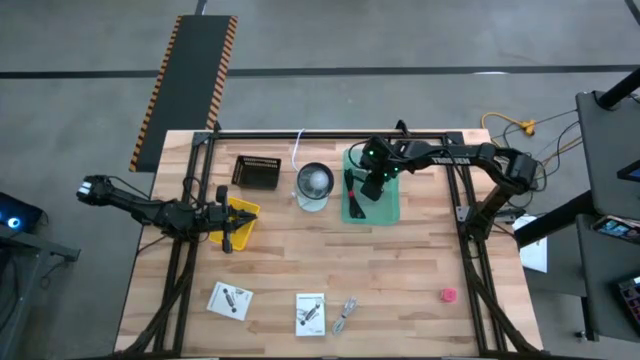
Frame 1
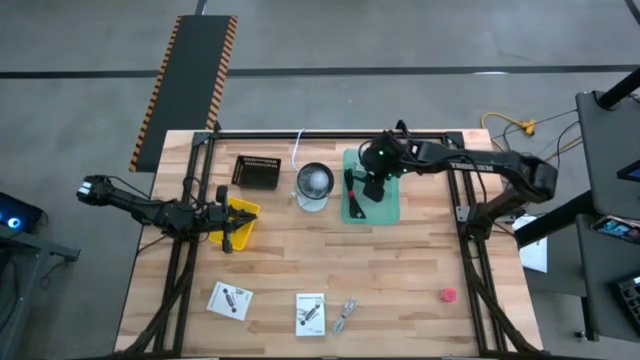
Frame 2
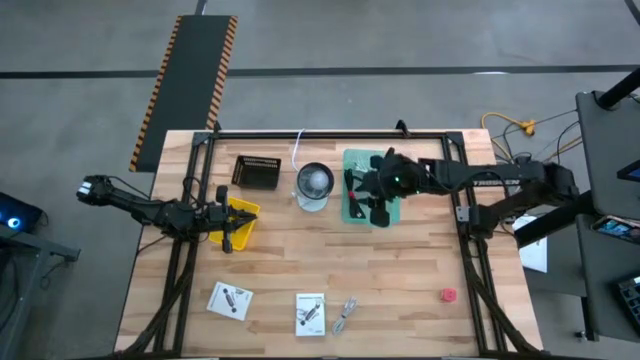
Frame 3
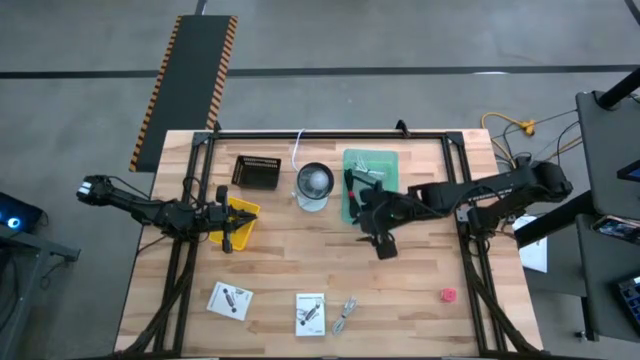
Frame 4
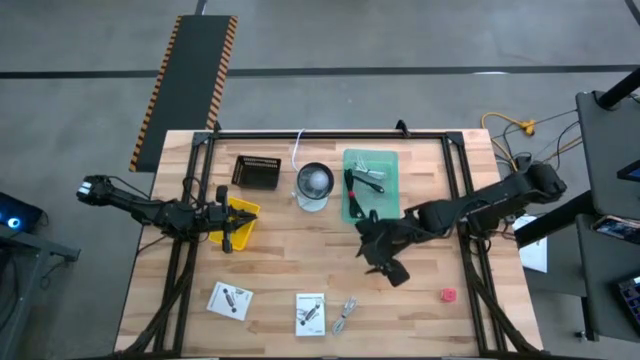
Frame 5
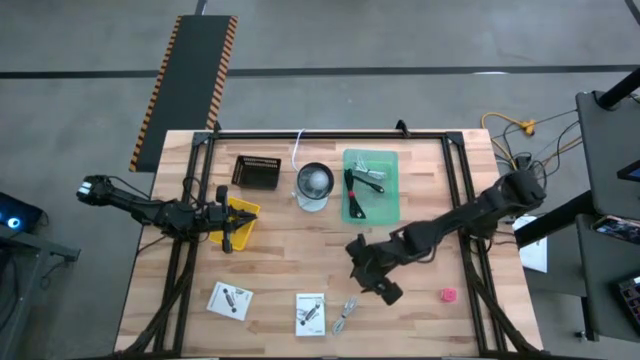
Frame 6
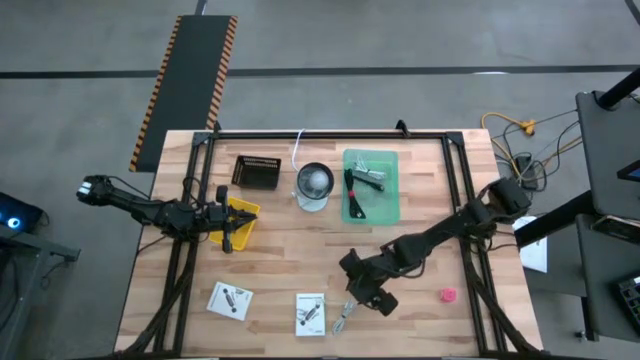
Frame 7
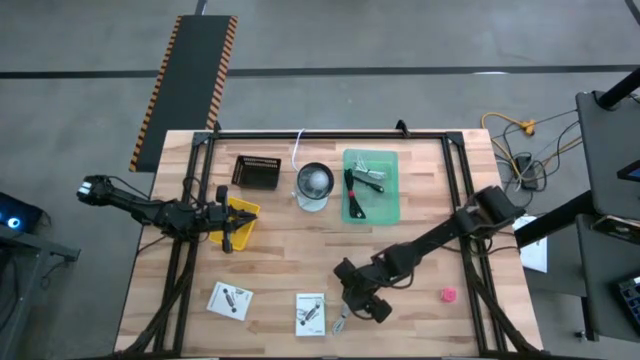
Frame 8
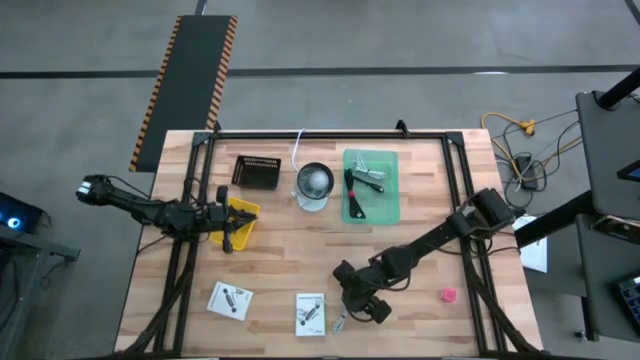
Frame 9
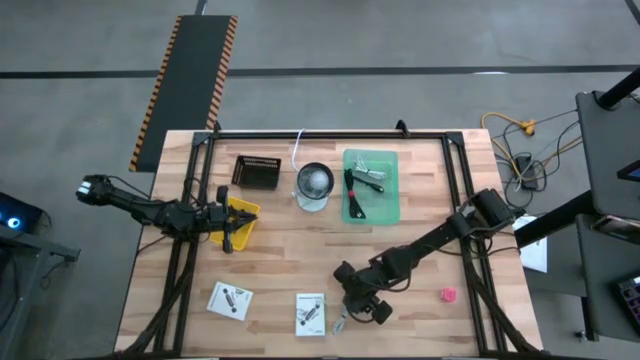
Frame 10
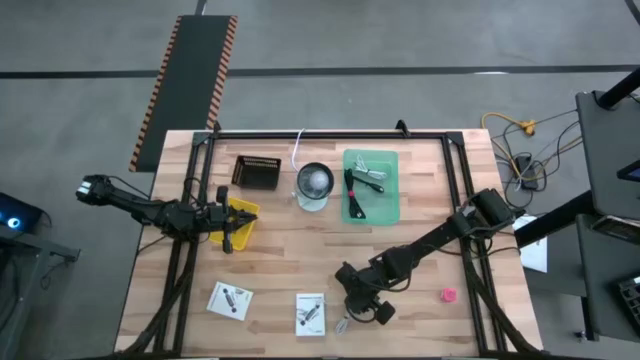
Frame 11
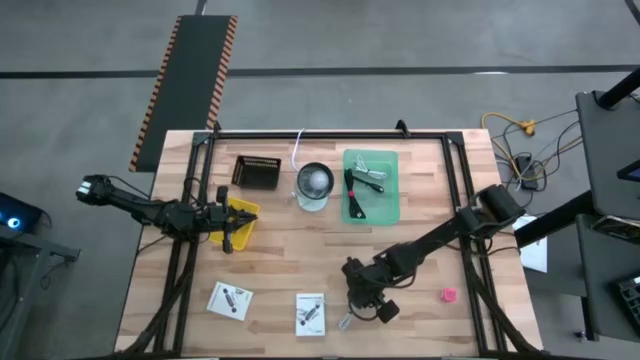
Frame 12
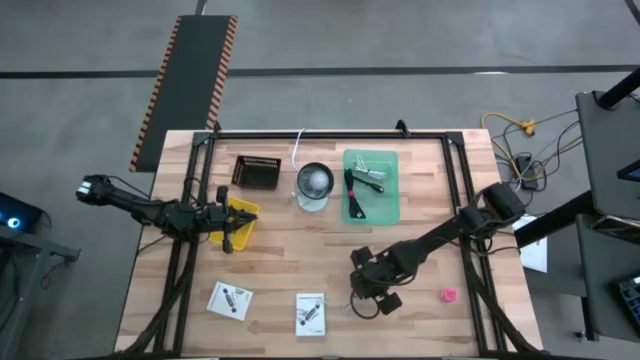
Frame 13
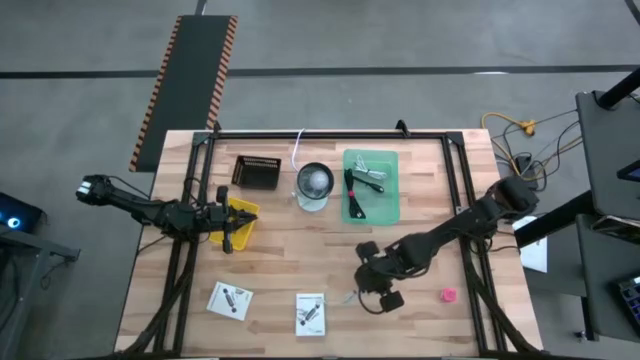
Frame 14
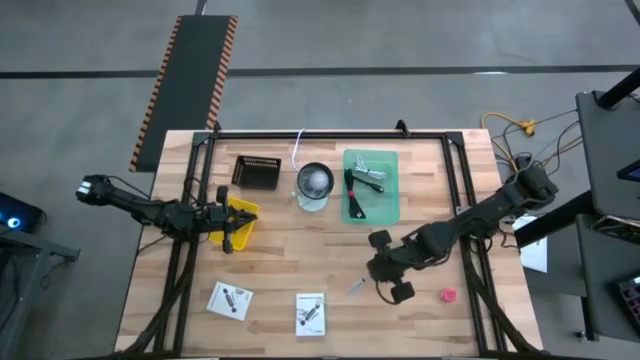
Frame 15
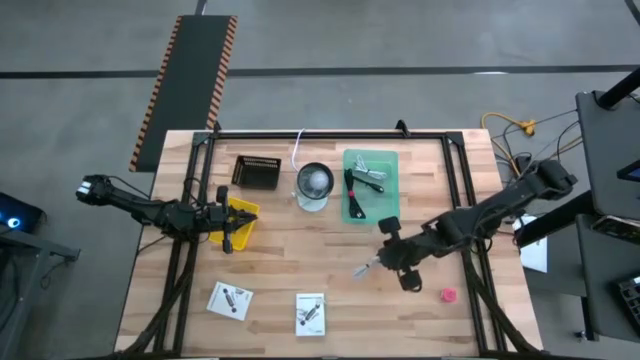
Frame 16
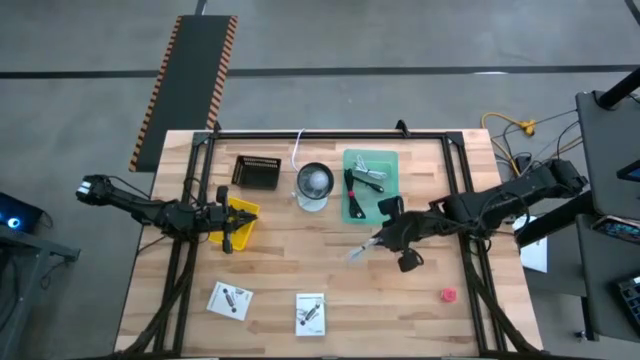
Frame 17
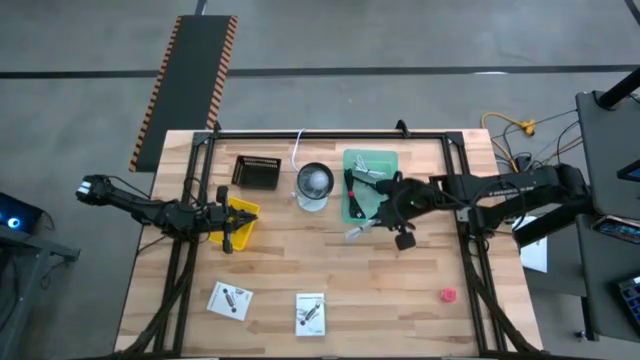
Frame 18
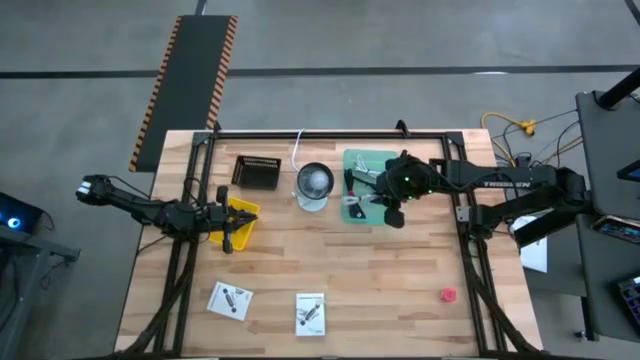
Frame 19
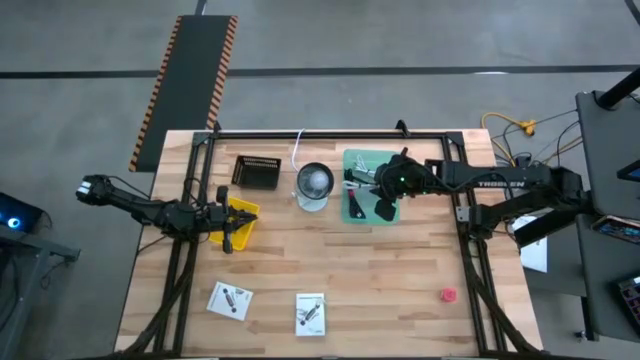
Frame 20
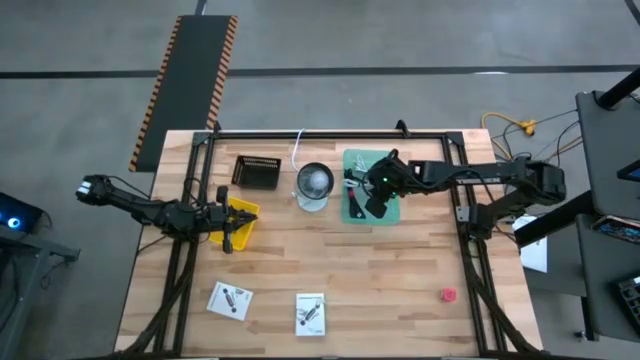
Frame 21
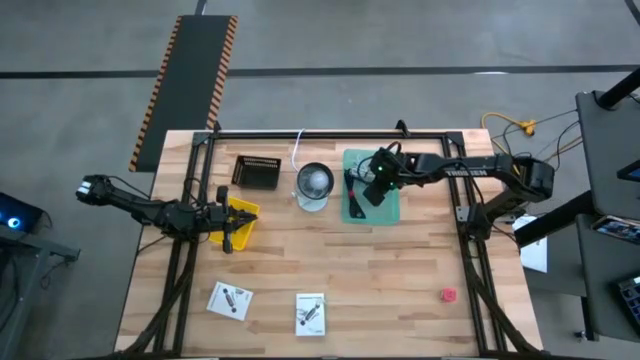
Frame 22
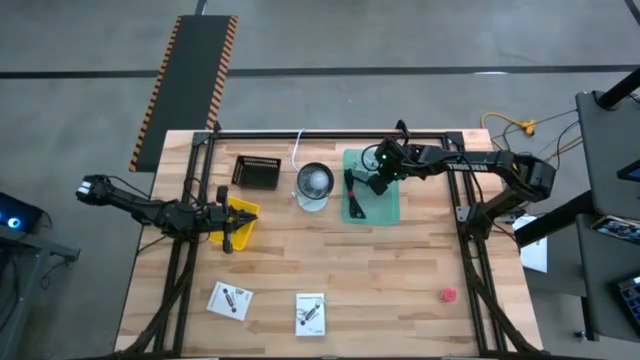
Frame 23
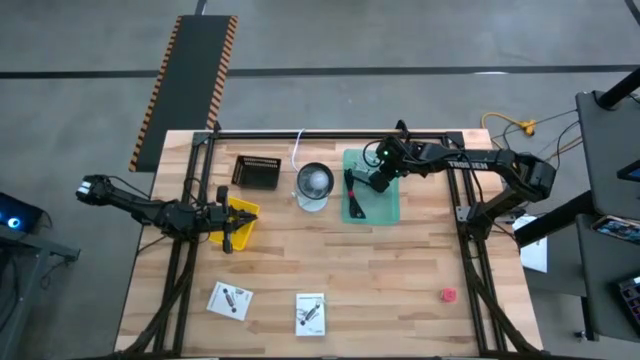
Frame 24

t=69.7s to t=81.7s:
Task: Pick and place items into bin
Put the white charger cable into the green bin

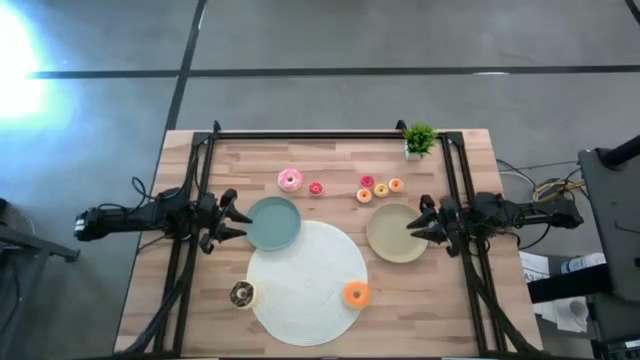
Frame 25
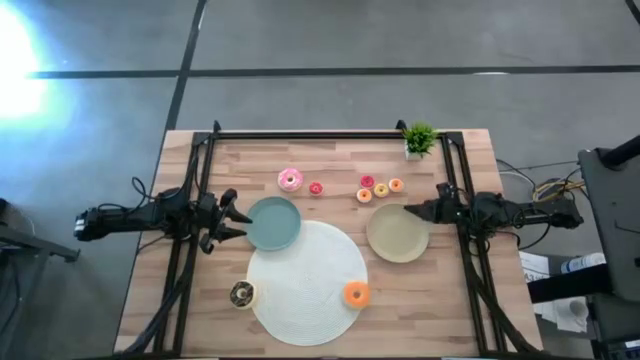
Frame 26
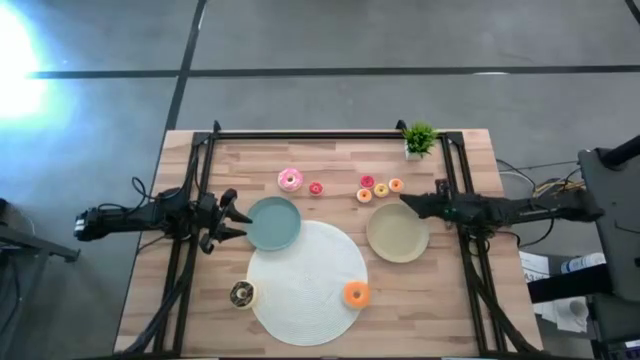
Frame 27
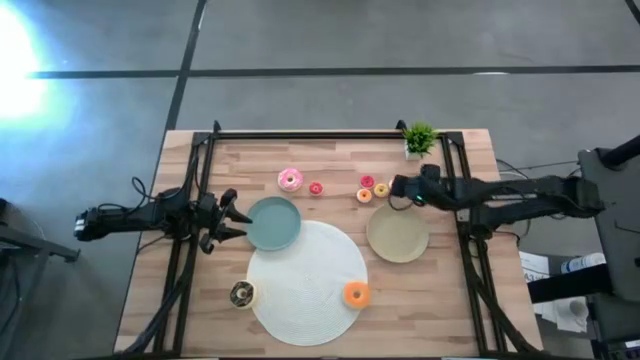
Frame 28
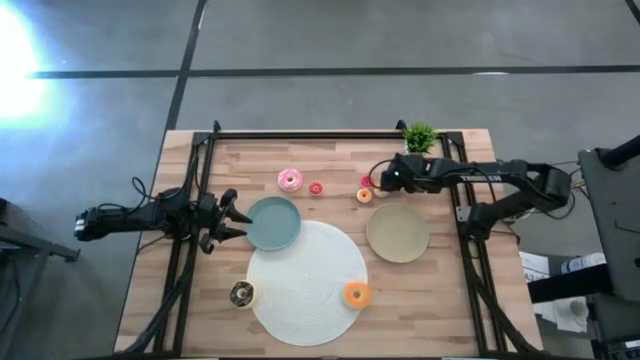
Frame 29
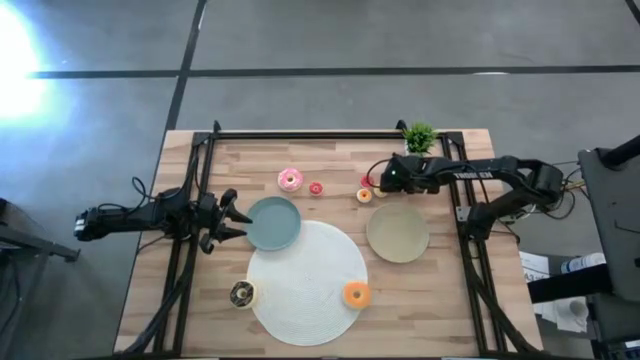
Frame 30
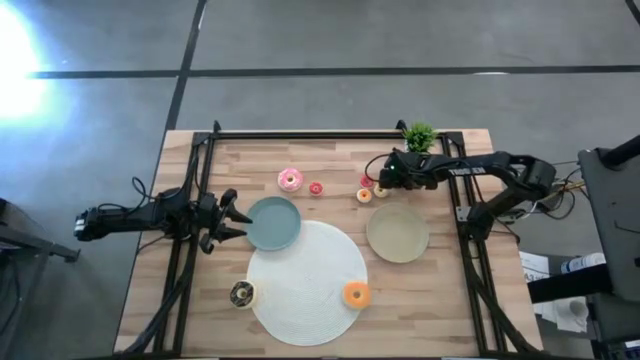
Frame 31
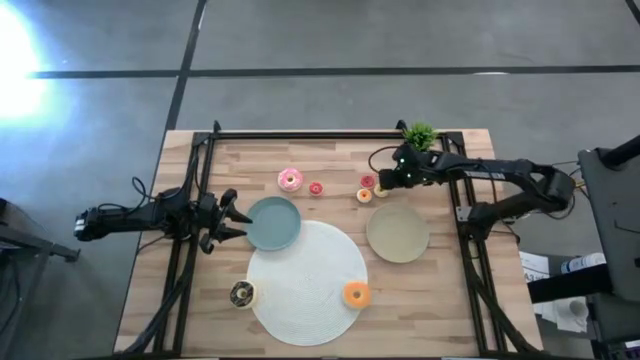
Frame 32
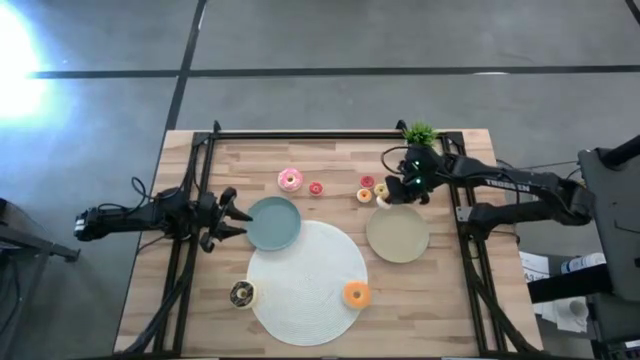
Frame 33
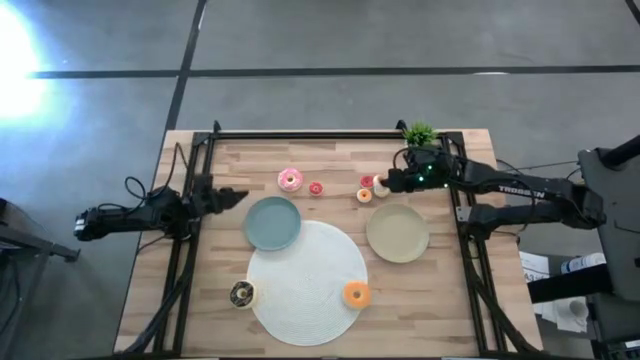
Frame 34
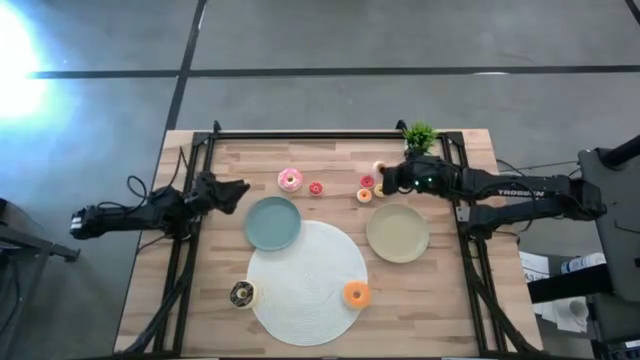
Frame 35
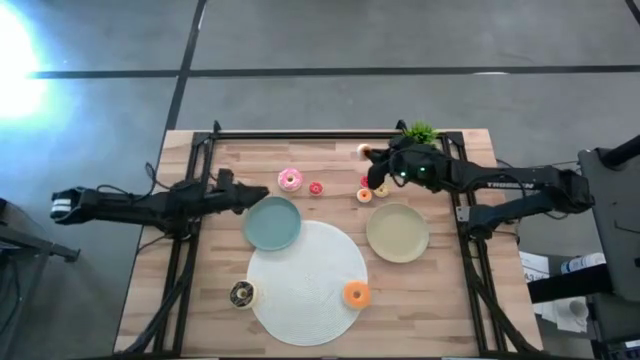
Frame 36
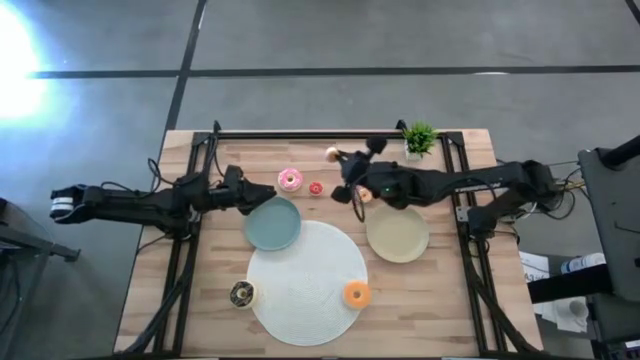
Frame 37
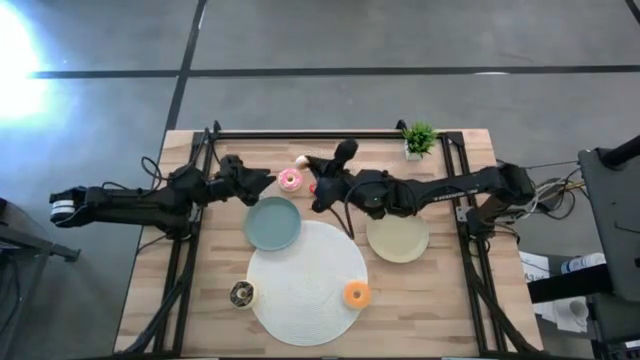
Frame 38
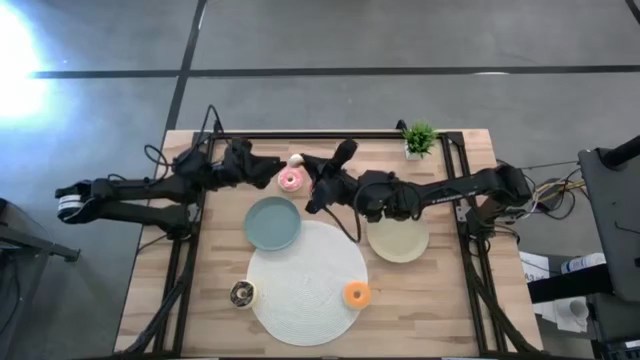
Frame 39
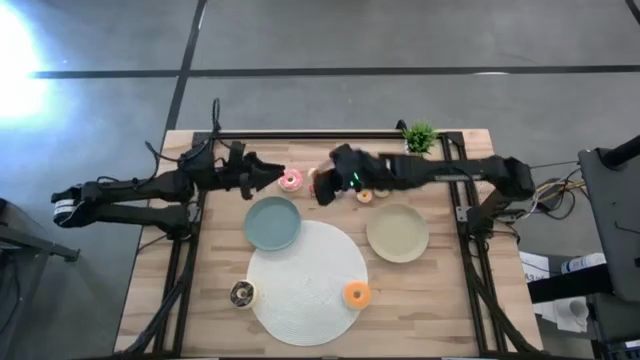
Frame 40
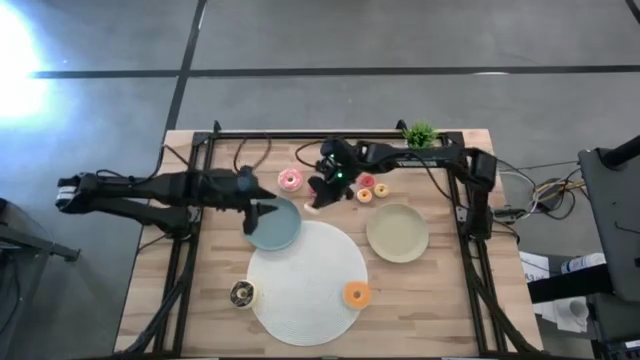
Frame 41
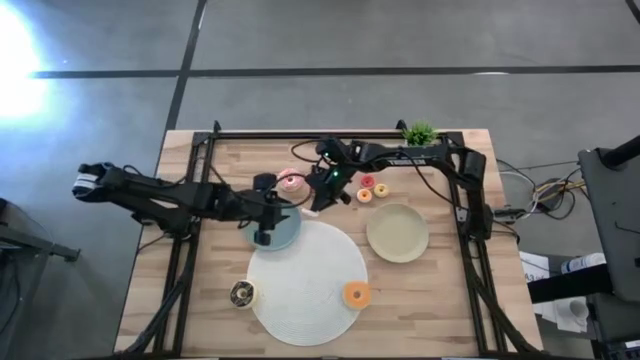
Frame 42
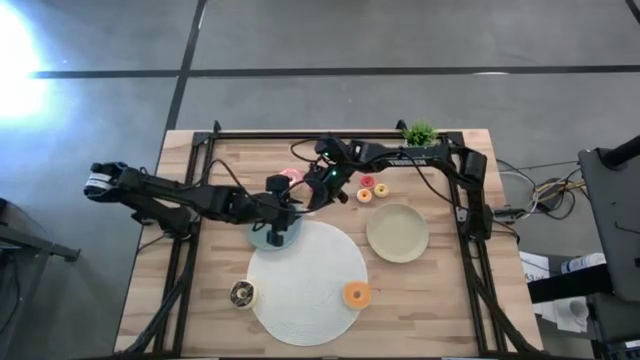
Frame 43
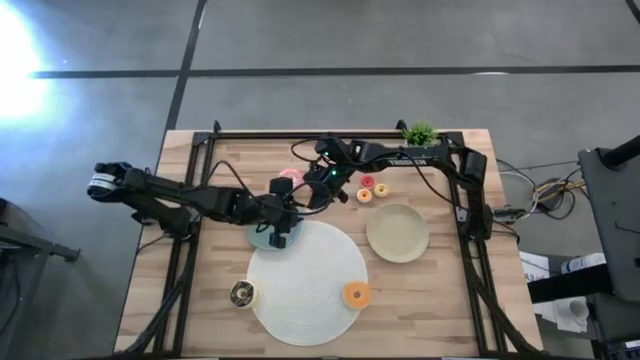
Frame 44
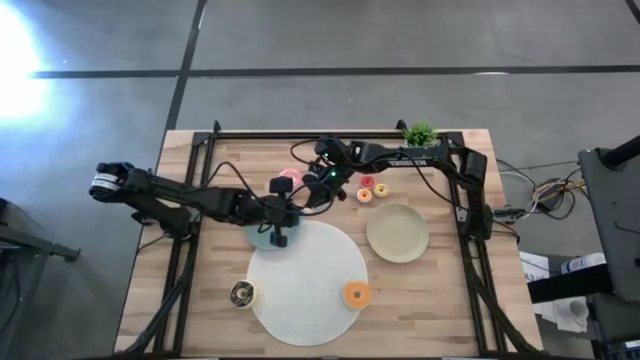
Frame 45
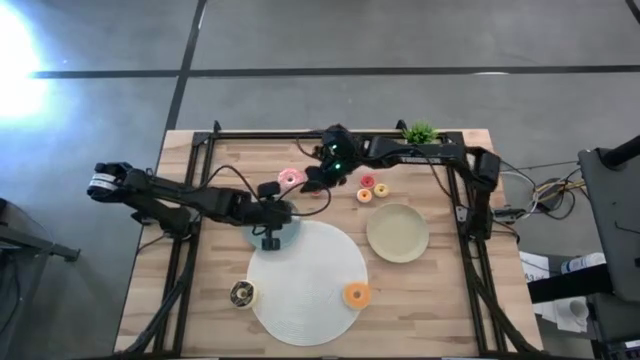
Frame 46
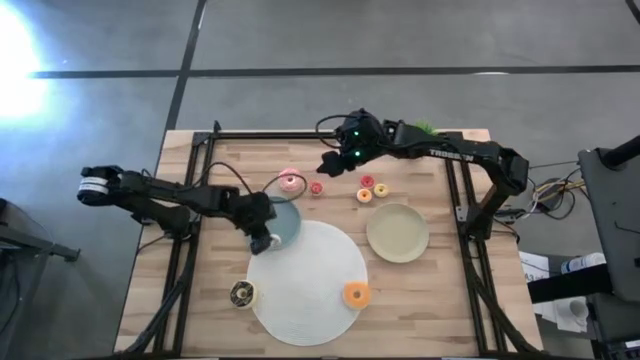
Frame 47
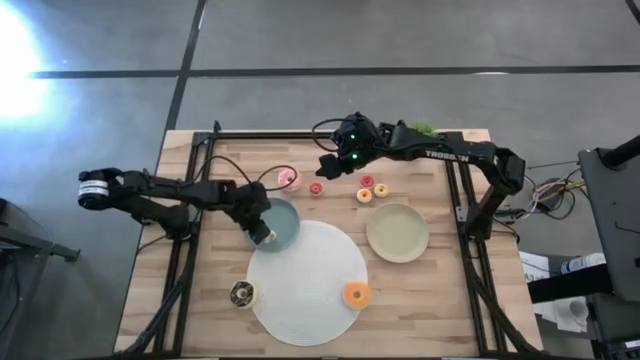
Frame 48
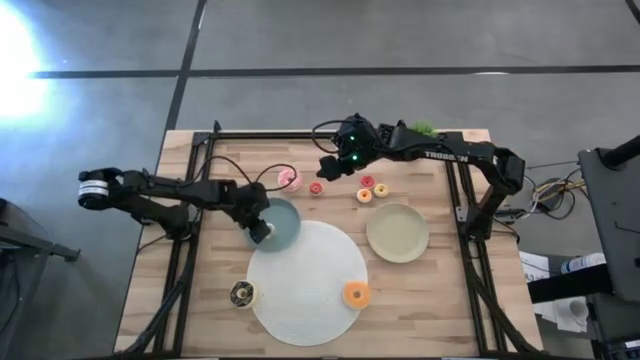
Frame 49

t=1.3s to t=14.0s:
Task: Pick & Place donuts
Put the right small orange donut on the blue plate
